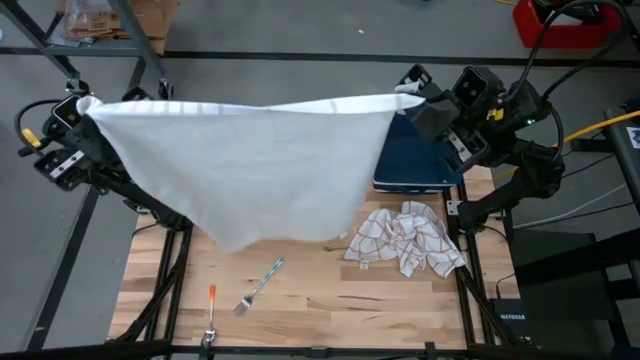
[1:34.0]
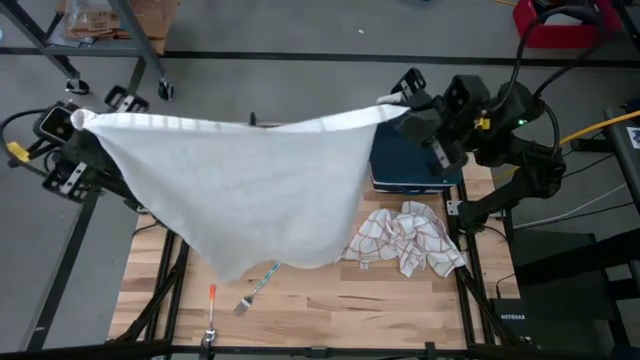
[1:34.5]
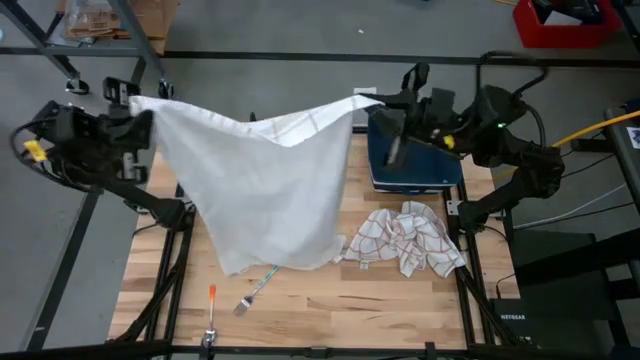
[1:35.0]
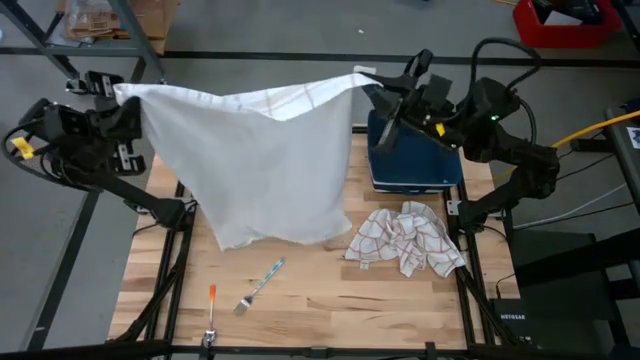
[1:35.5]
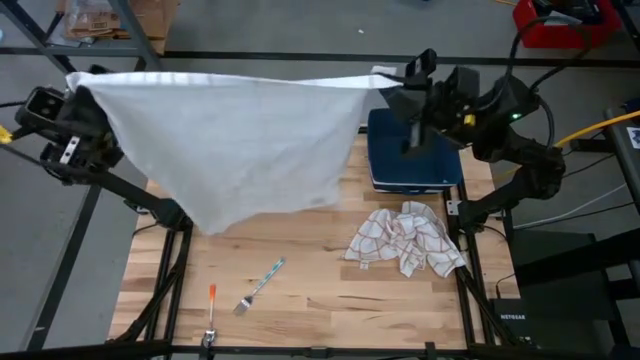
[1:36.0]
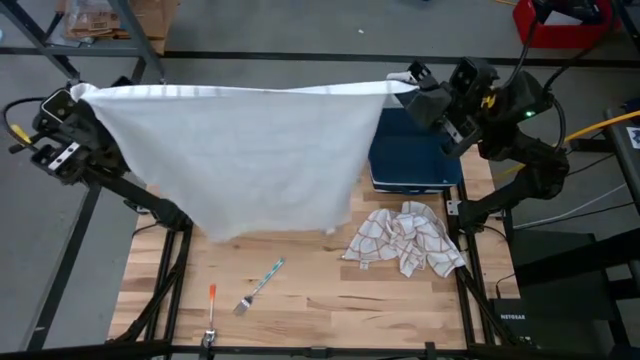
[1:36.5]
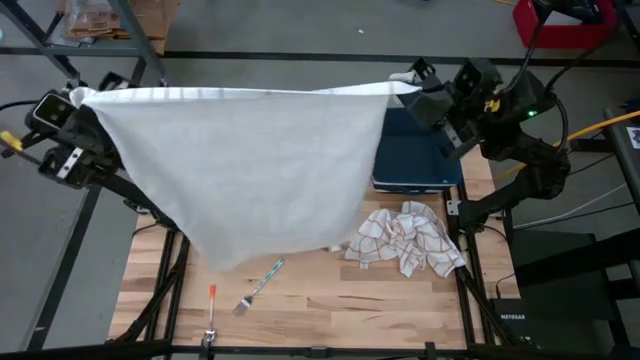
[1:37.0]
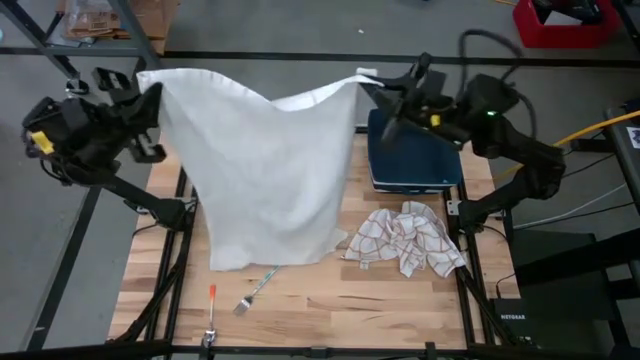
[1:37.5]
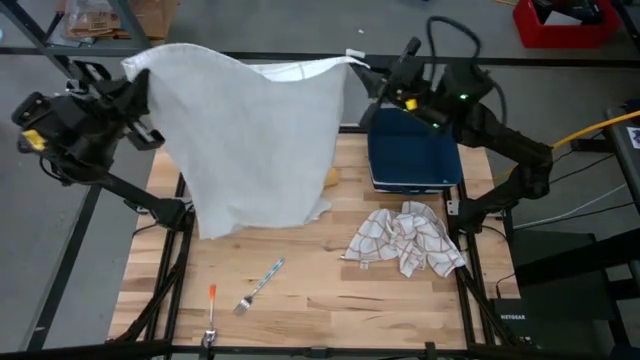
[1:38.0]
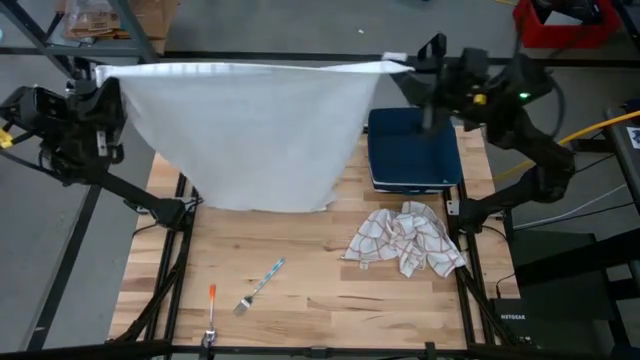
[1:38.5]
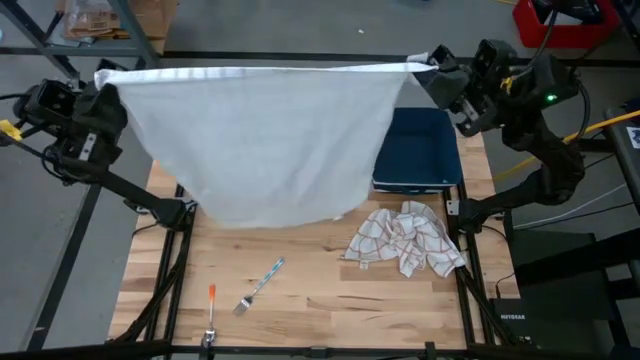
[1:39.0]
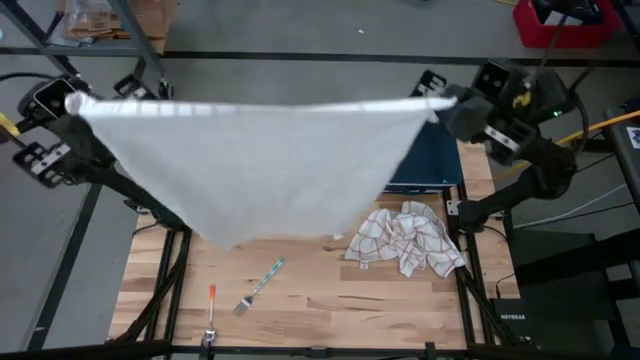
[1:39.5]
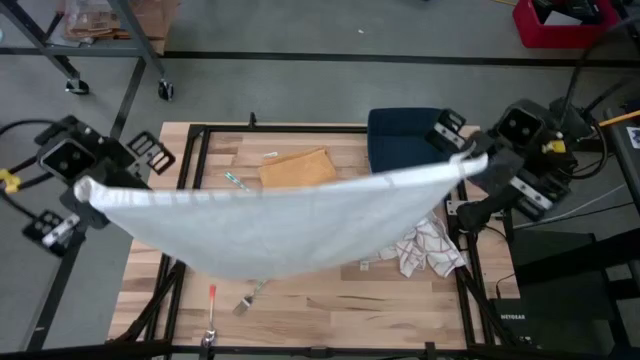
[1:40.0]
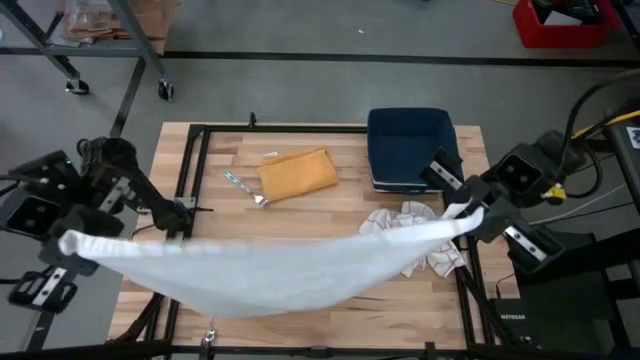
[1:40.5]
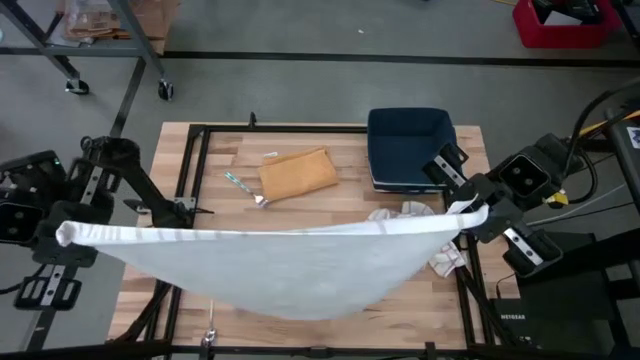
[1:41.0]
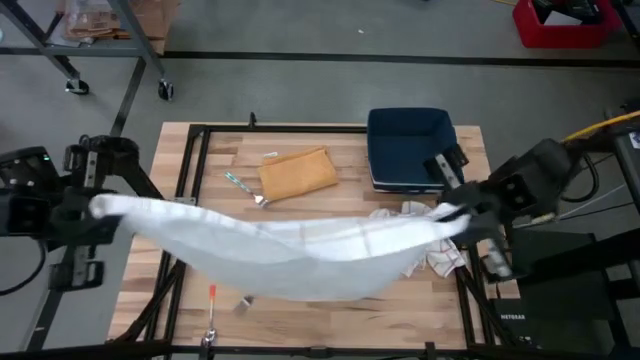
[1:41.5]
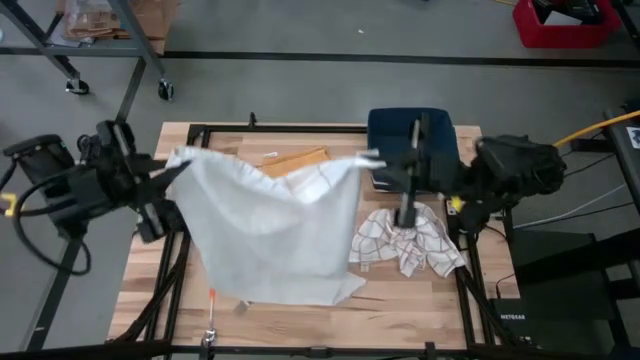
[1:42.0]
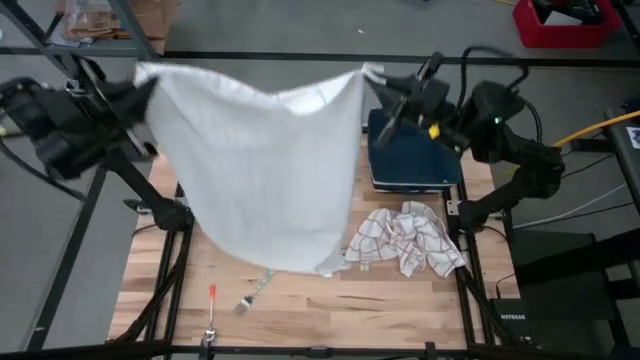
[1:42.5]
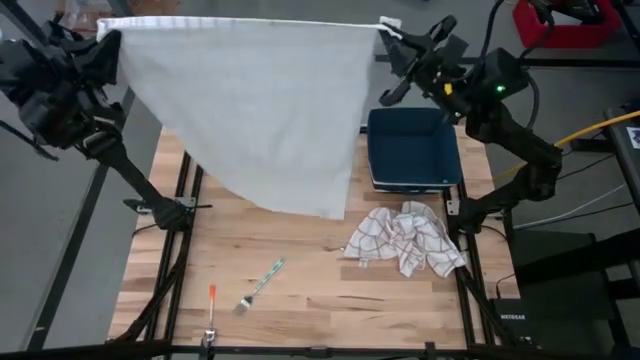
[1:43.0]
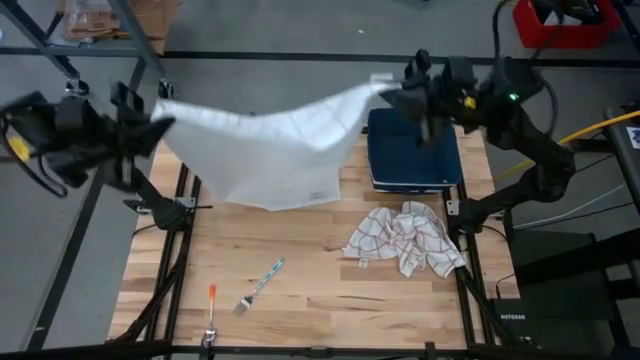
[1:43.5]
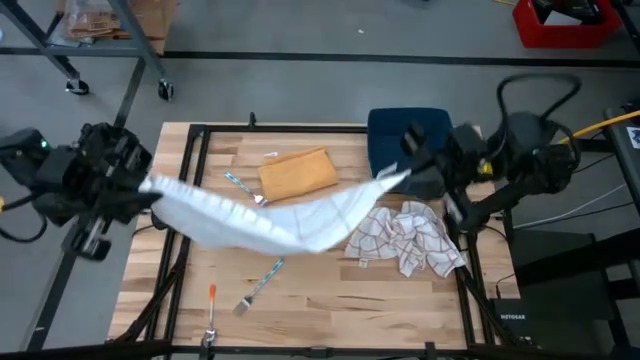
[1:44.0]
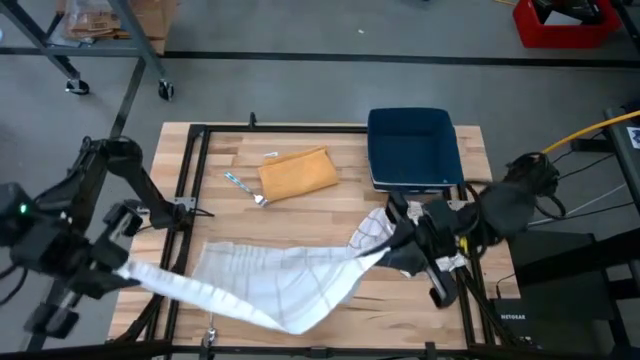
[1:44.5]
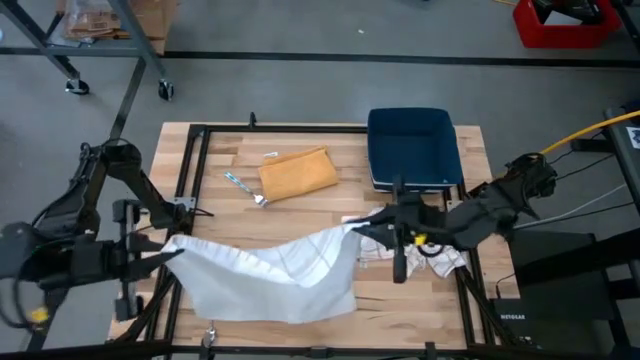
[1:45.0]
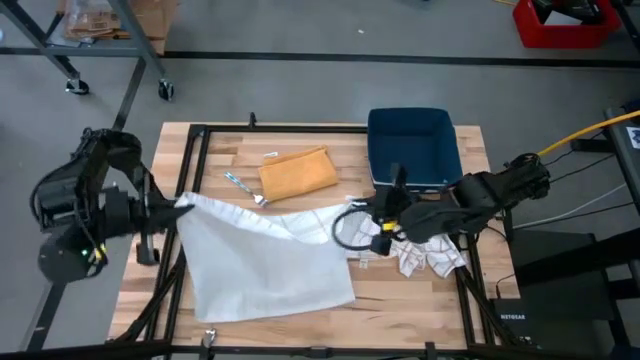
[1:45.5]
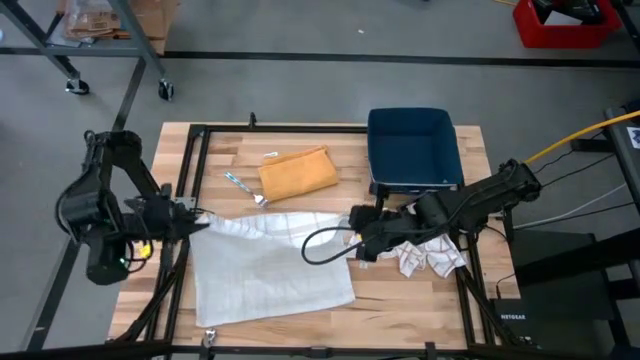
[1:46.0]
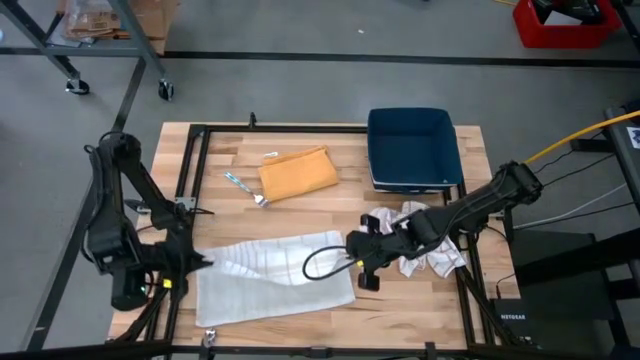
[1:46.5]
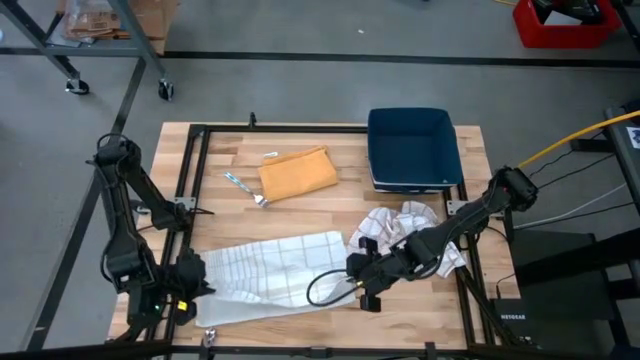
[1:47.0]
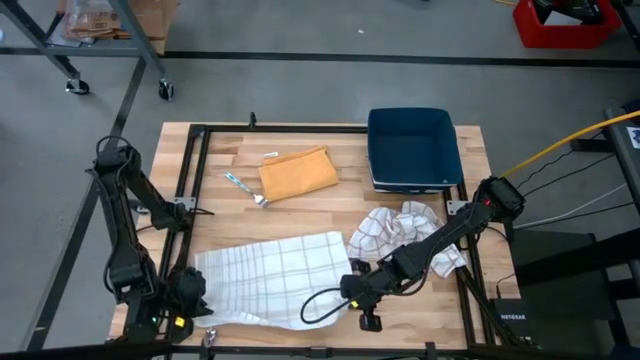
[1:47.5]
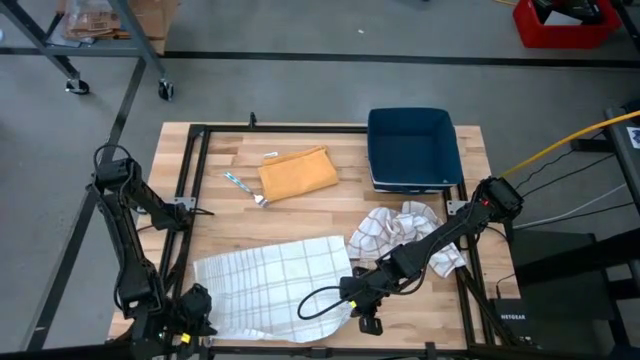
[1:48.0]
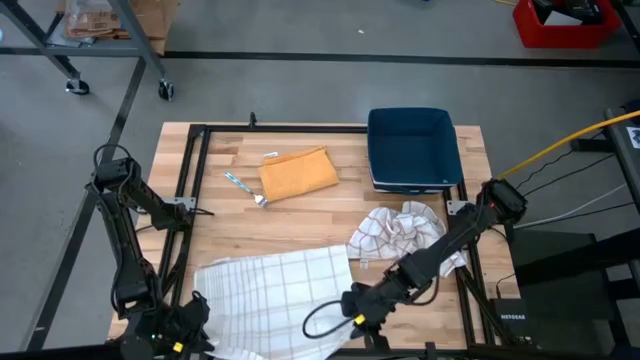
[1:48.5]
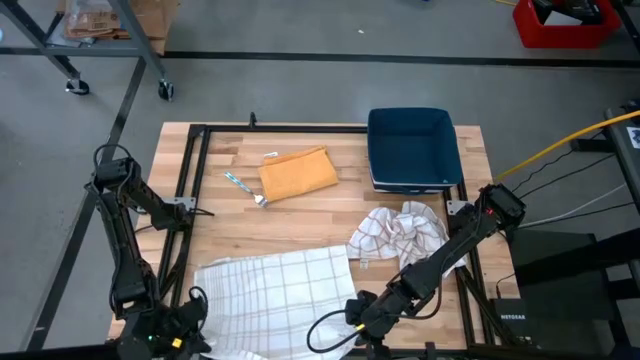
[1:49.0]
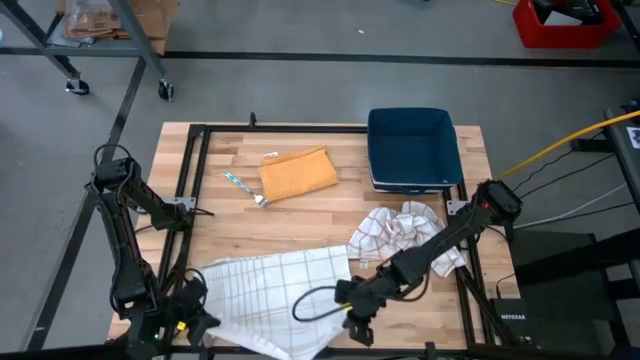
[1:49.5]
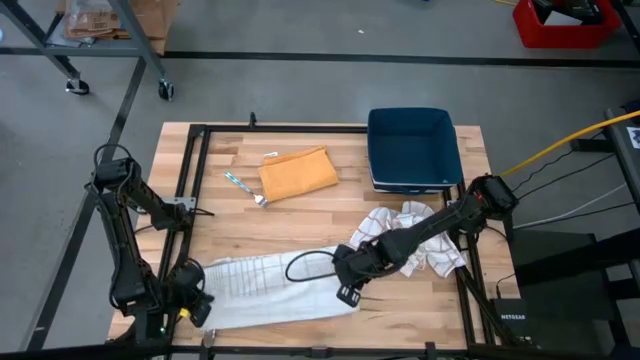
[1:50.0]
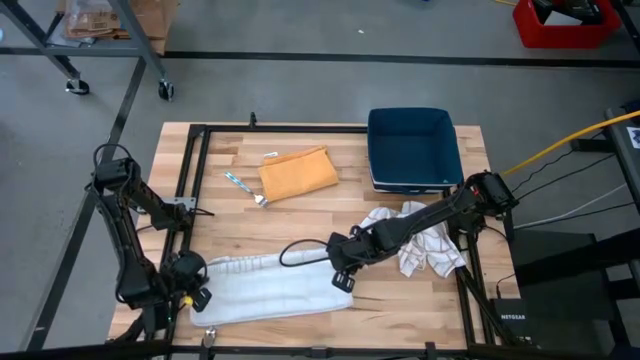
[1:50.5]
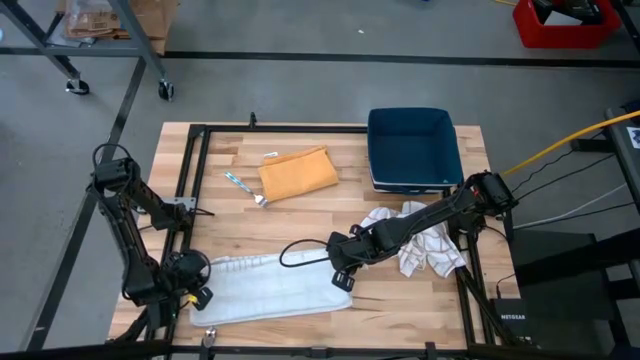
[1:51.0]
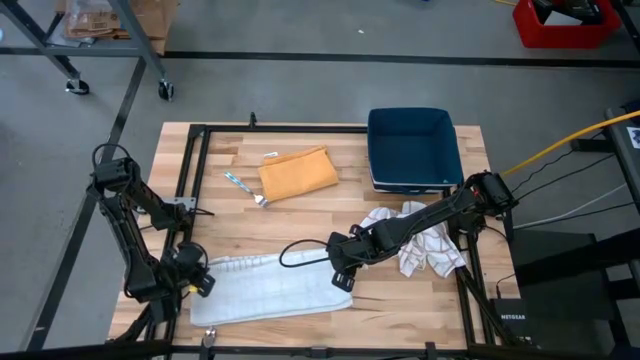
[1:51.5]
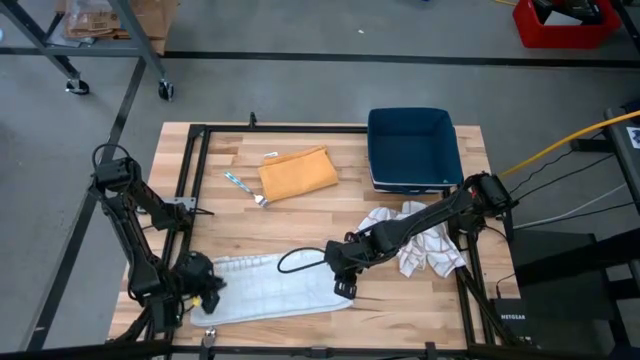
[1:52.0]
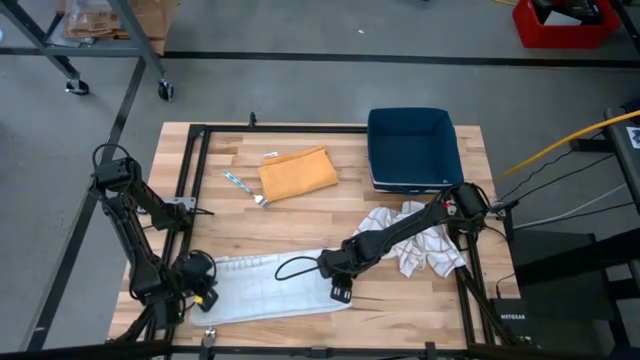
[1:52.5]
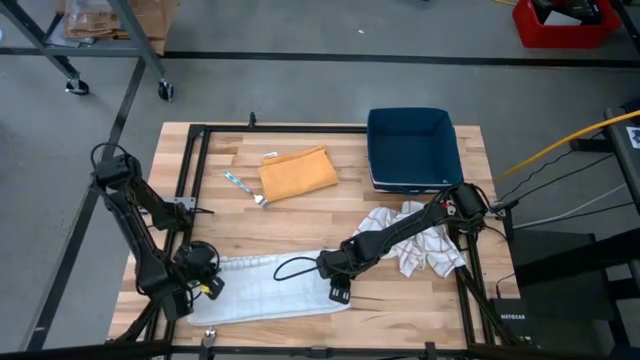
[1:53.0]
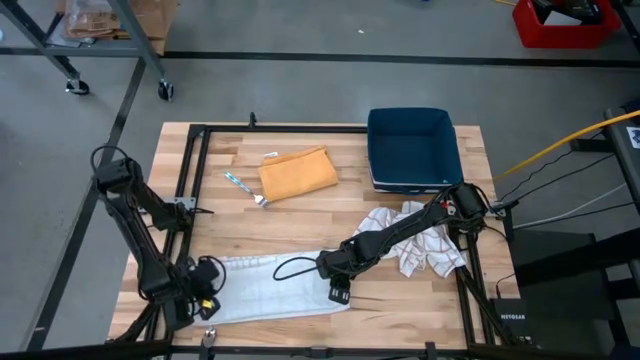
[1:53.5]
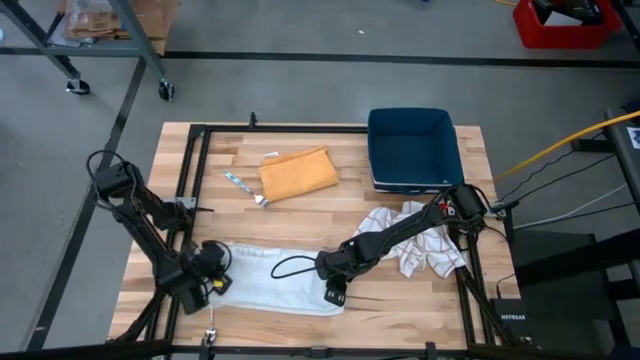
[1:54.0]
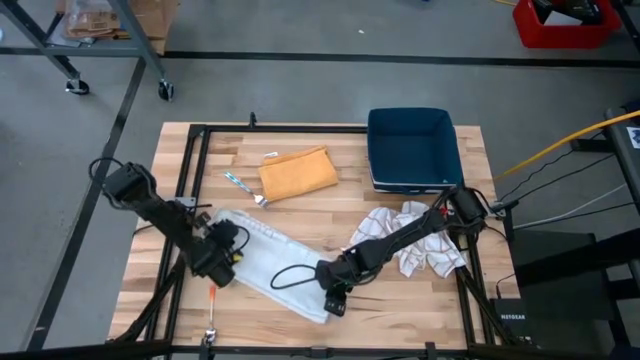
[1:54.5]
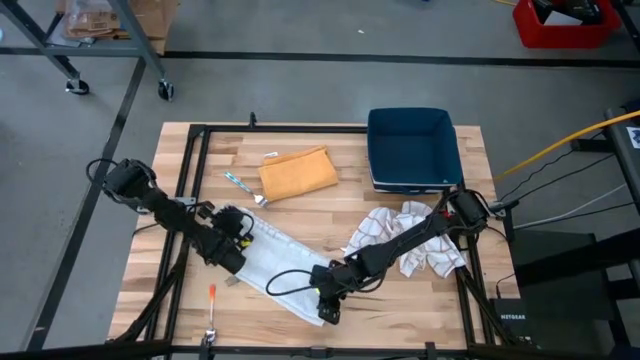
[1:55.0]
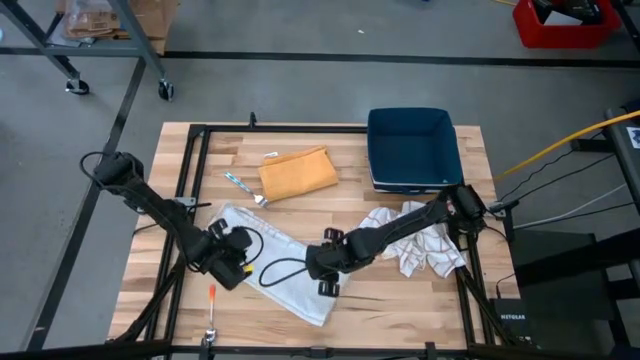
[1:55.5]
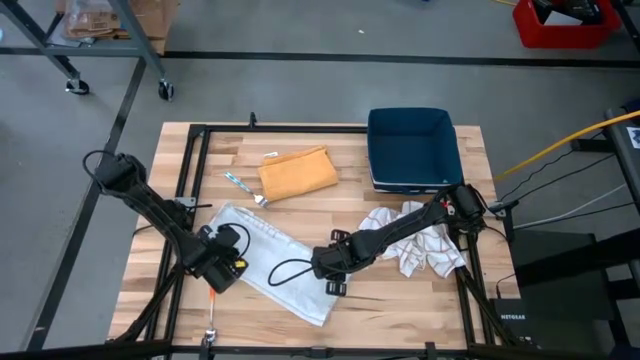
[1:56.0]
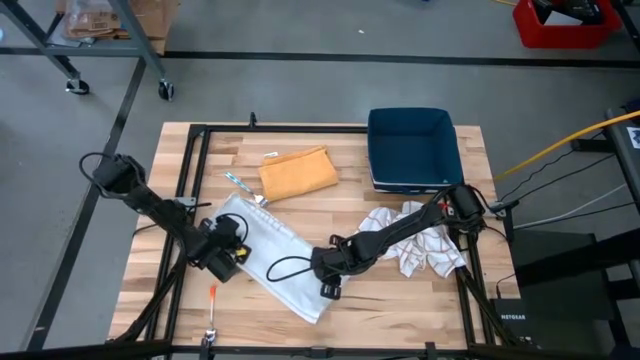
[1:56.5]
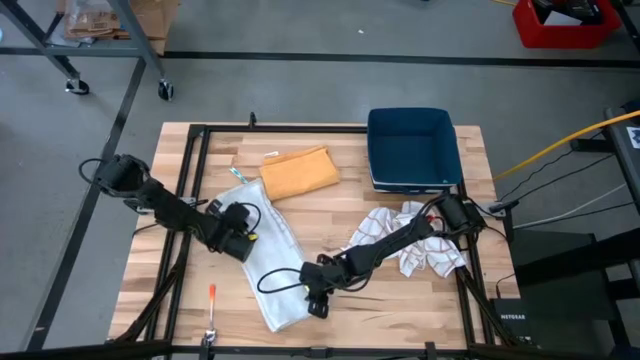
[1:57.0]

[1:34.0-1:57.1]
Task: Fold towel
Fold the left white towel
